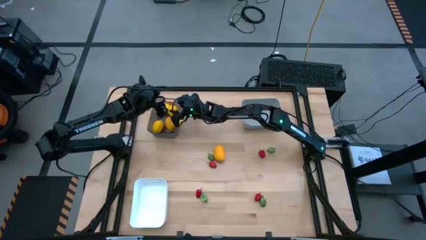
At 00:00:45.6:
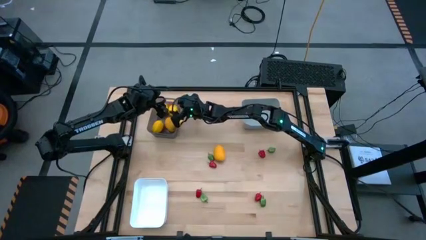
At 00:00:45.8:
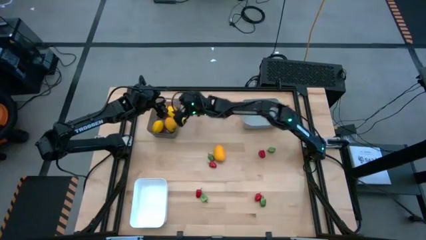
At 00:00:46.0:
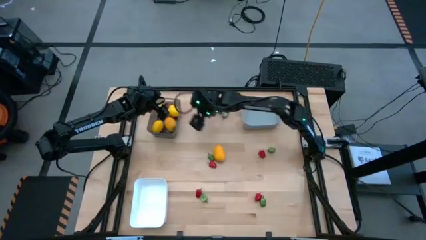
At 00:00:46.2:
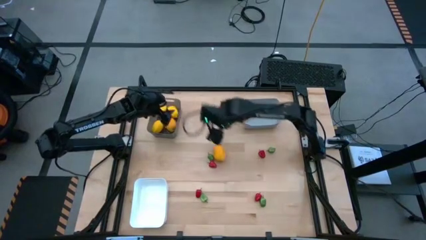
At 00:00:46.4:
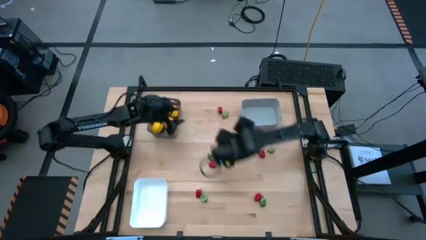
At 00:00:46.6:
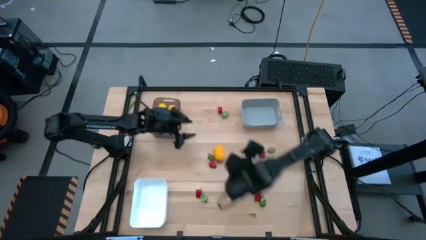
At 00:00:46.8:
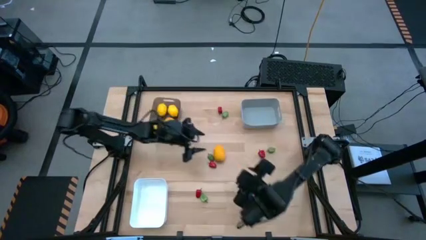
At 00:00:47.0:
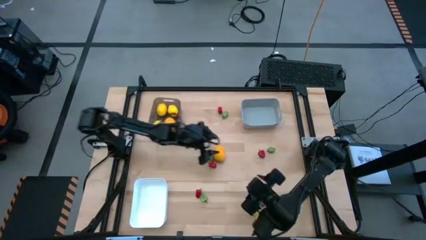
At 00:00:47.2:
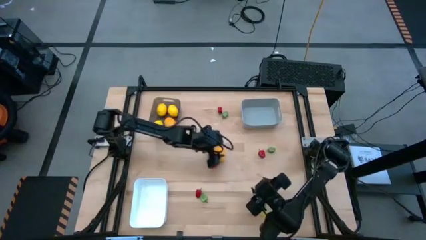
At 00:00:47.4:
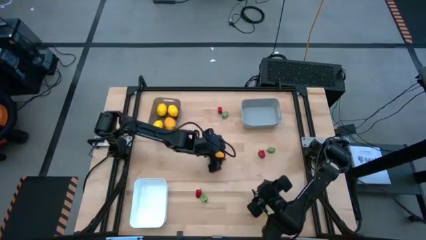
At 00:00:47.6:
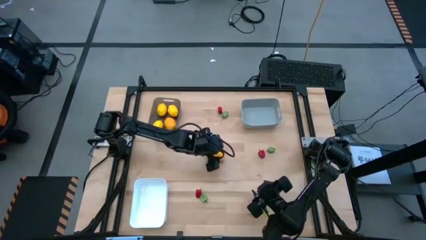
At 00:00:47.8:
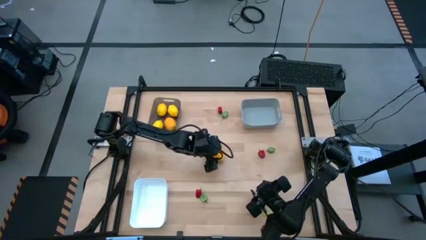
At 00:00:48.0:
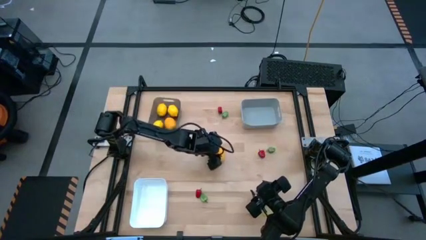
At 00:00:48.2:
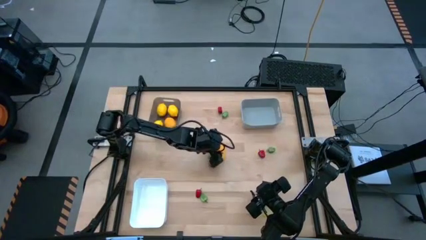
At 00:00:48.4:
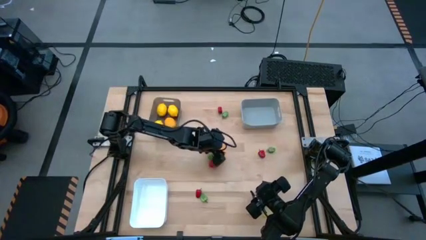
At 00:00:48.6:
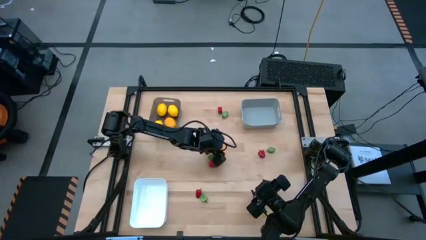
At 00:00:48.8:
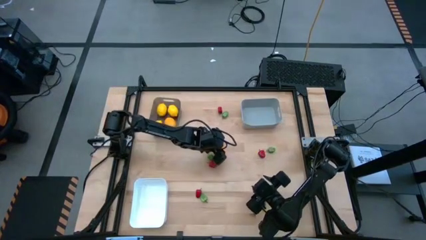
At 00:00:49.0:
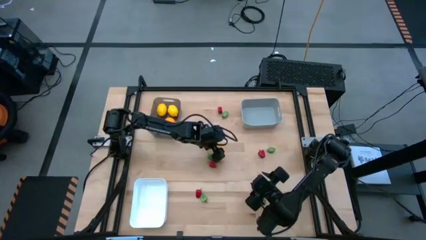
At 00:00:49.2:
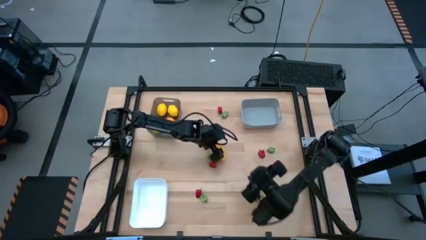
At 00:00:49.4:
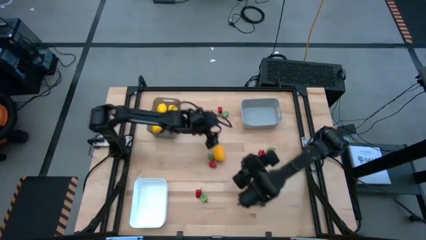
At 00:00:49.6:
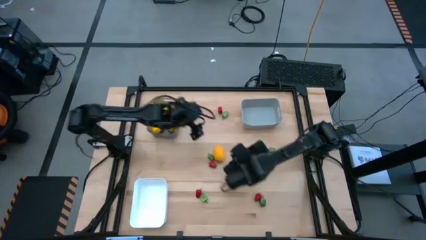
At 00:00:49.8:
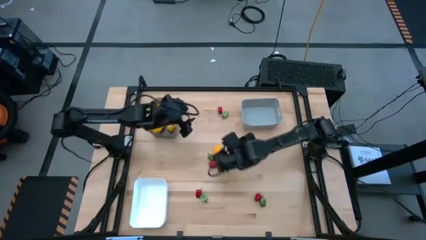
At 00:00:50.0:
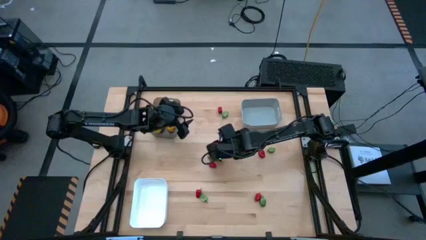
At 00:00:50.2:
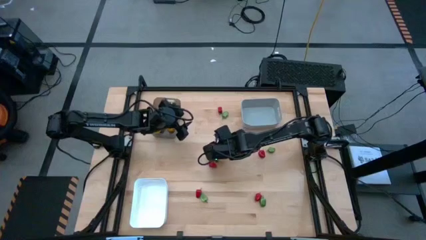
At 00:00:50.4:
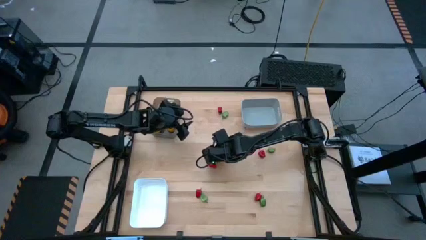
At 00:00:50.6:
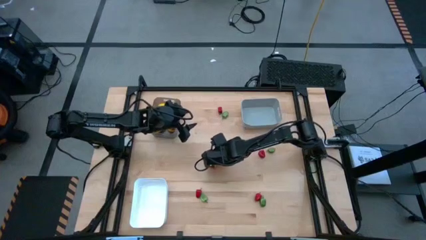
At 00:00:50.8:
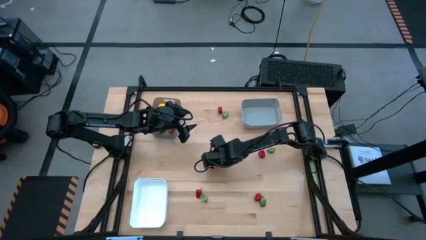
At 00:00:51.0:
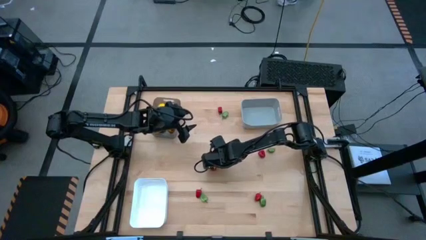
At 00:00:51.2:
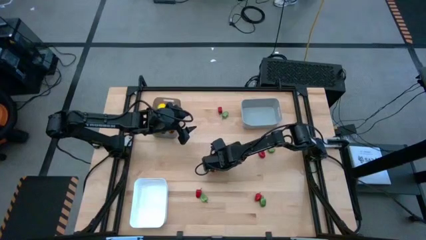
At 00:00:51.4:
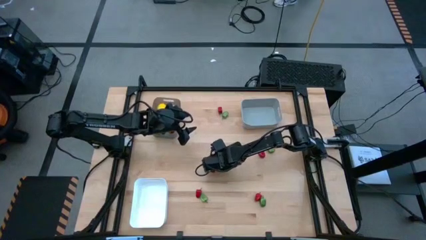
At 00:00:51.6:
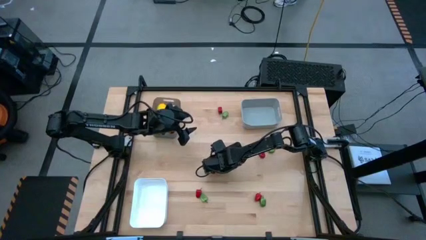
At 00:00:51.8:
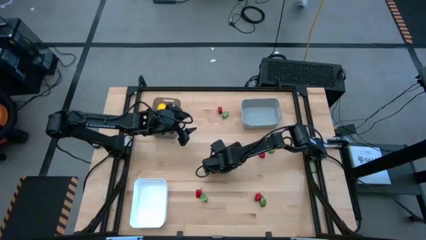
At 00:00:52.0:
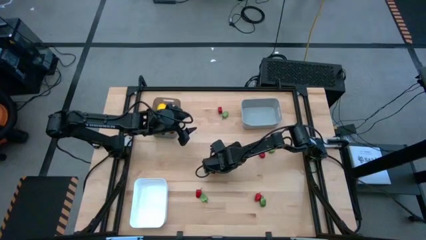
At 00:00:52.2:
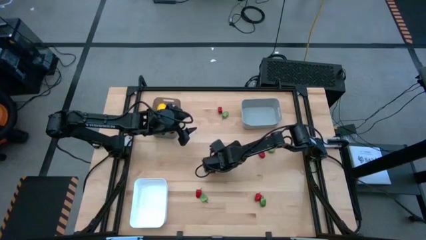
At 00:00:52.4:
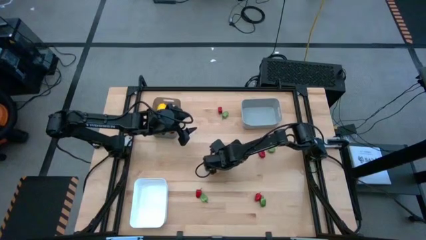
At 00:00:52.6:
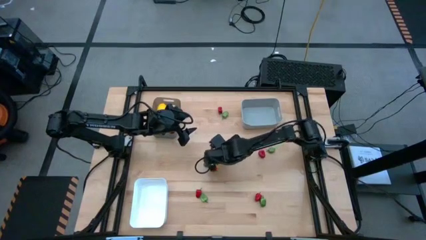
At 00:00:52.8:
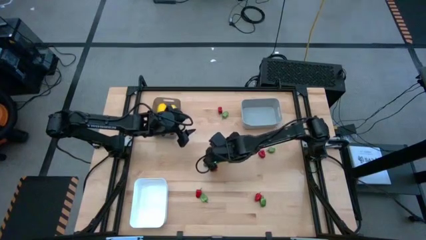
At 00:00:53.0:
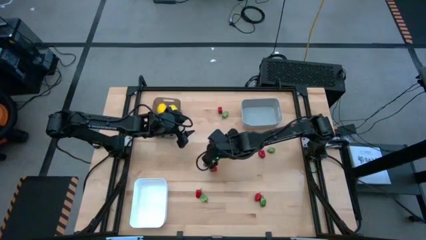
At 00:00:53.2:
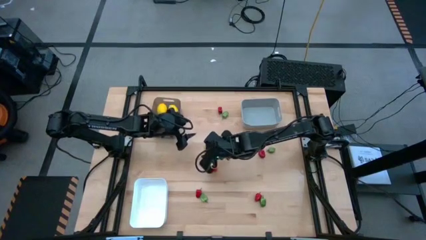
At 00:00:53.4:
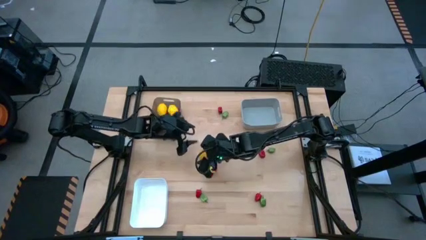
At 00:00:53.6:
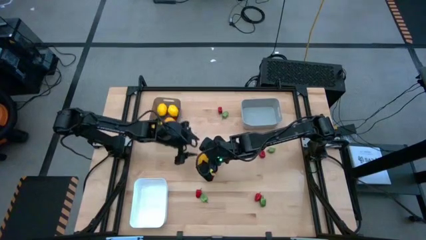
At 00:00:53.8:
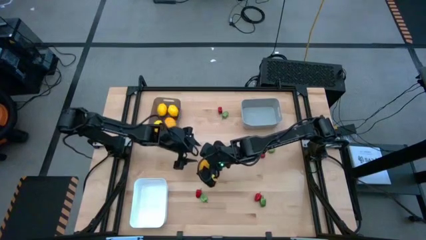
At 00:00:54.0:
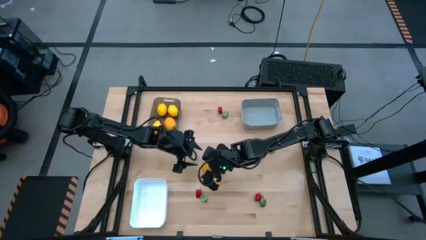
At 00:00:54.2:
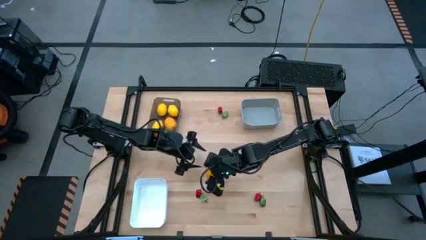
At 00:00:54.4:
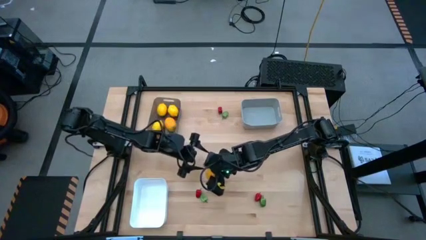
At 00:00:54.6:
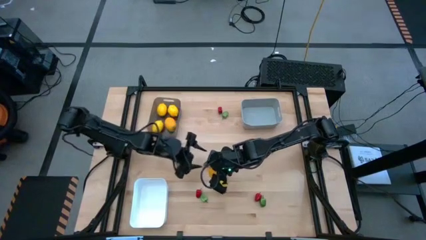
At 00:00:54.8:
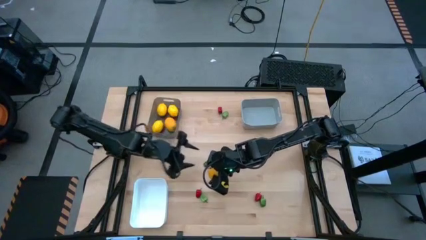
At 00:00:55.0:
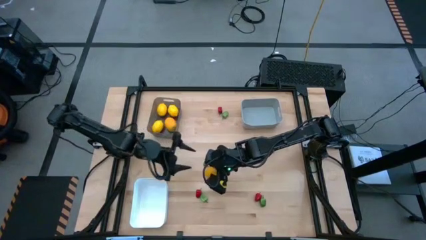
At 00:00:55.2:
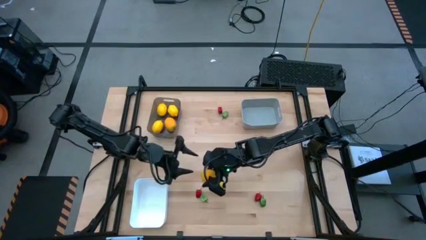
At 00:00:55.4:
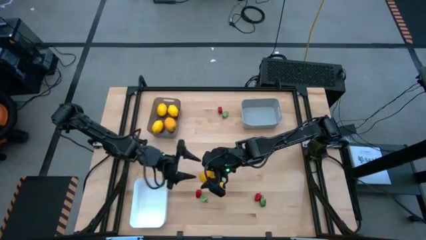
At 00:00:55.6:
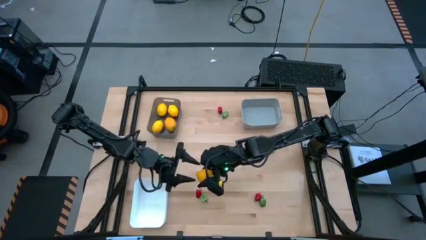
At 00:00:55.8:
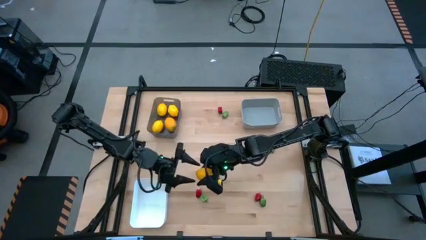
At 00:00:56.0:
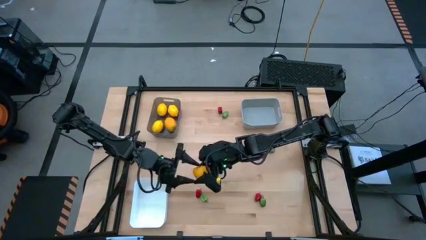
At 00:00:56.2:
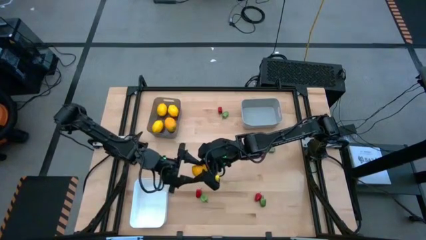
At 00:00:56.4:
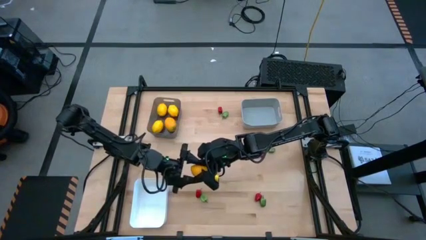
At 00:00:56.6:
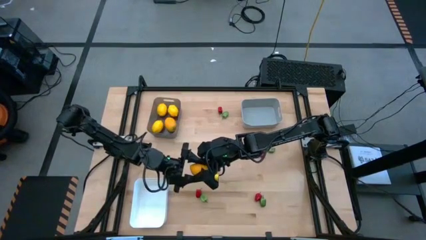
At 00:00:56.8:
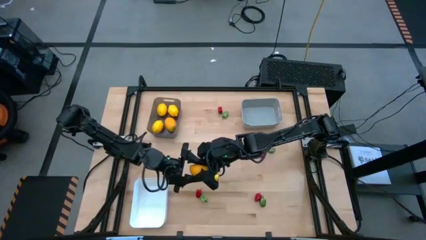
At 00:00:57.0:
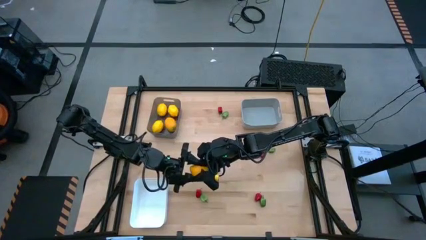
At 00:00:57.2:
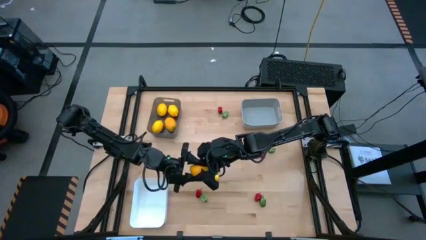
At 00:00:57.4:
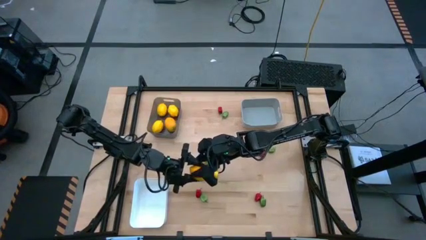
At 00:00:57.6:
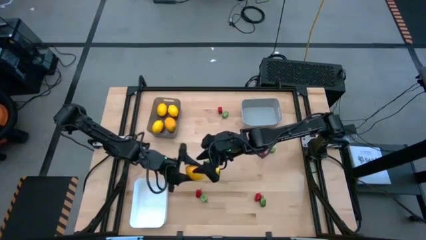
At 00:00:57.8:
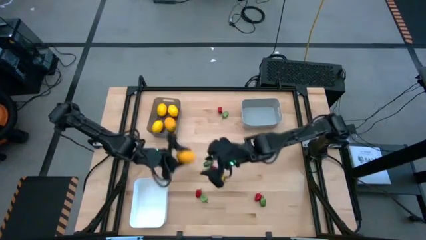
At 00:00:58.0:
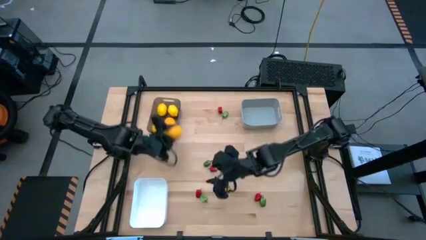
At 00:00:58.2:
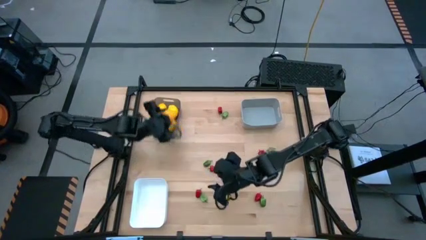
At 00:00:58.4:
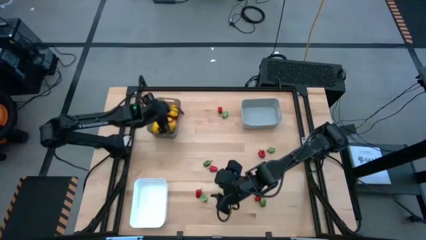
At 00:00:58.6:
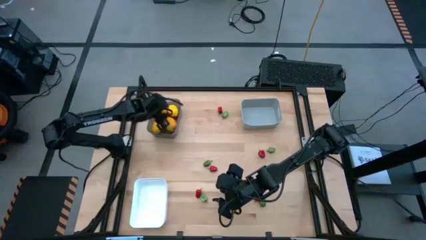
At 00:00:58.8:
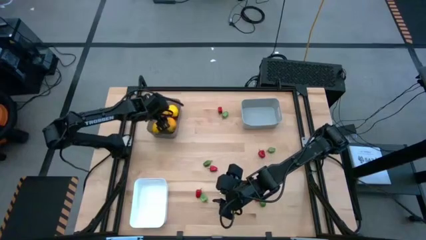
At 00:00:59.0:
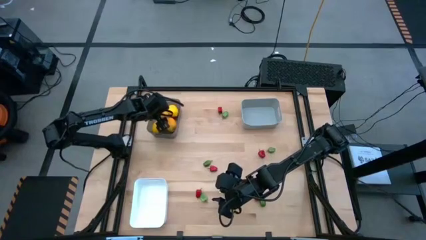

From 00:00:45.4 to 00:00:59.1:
Task: Sort produce into baskets
Put the lemon into the black bin
